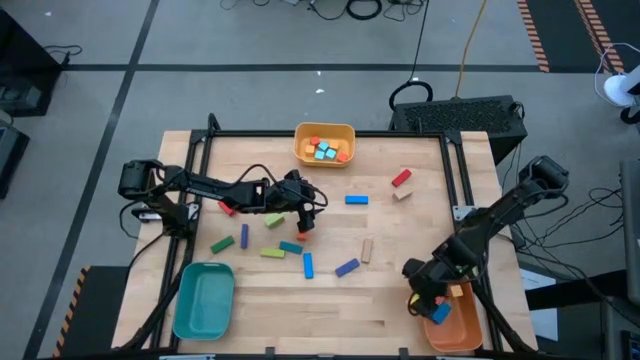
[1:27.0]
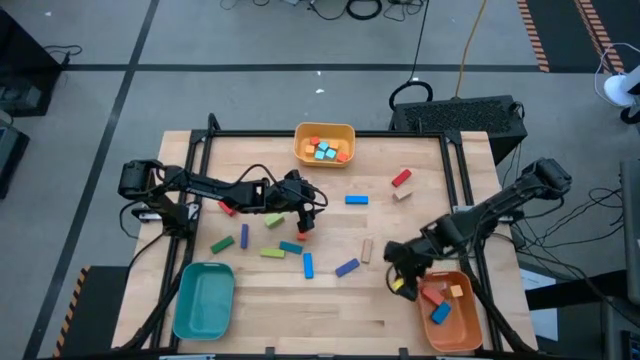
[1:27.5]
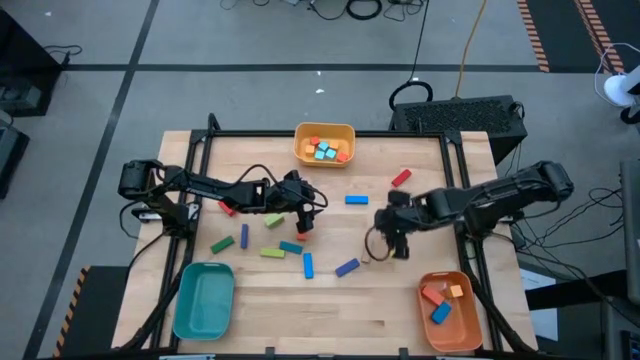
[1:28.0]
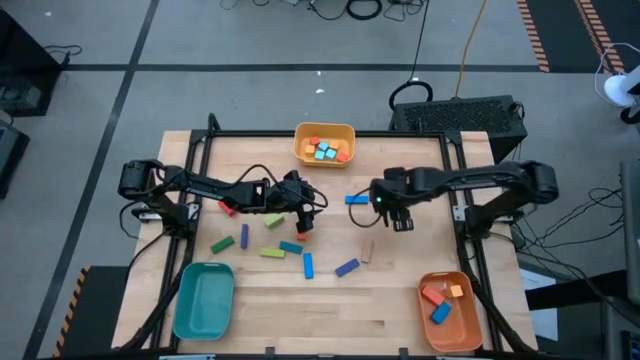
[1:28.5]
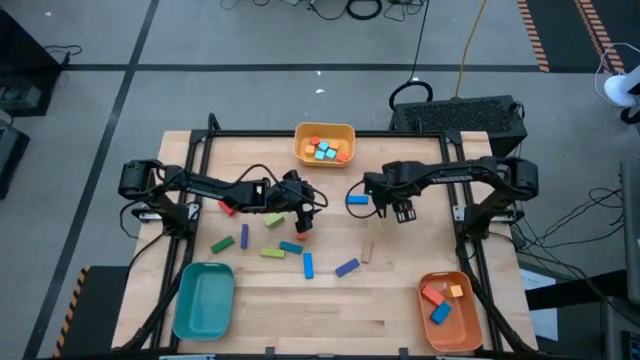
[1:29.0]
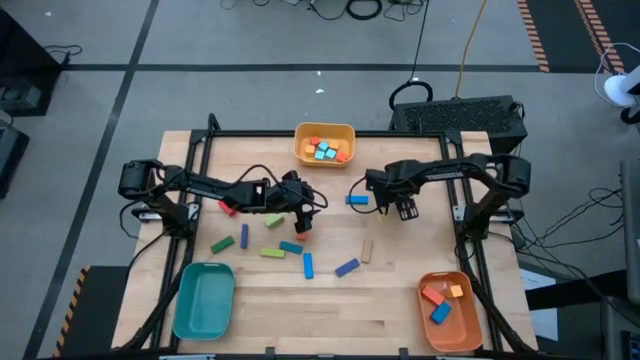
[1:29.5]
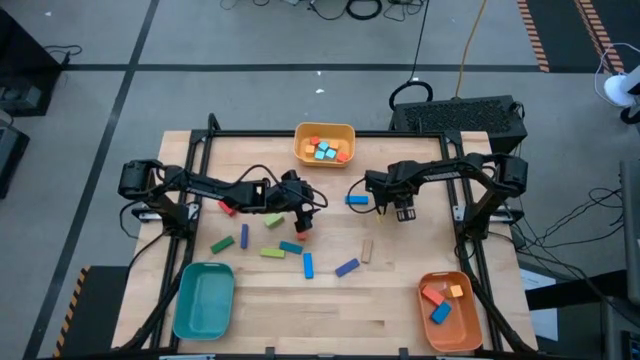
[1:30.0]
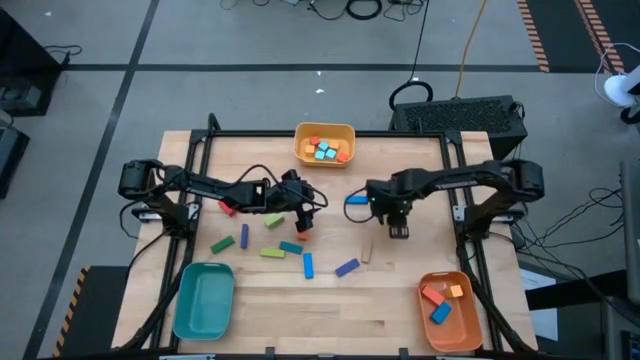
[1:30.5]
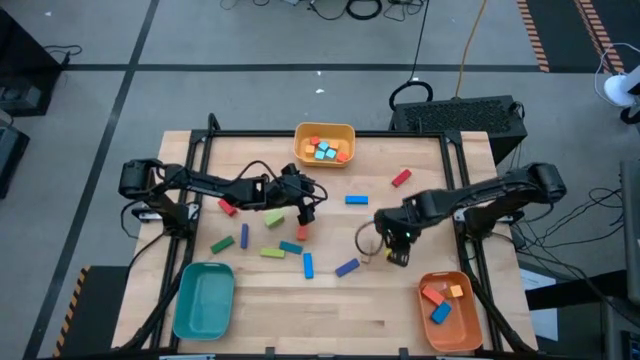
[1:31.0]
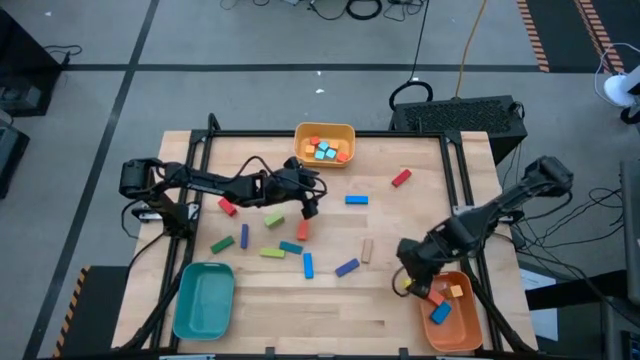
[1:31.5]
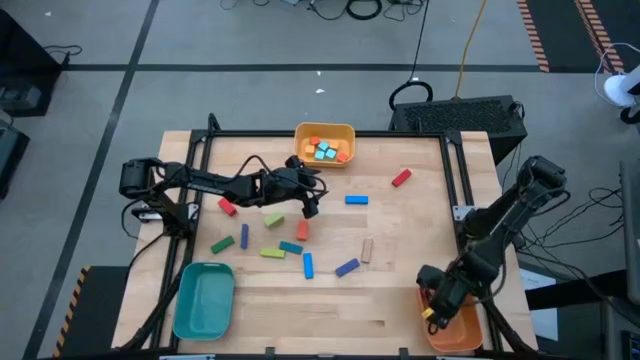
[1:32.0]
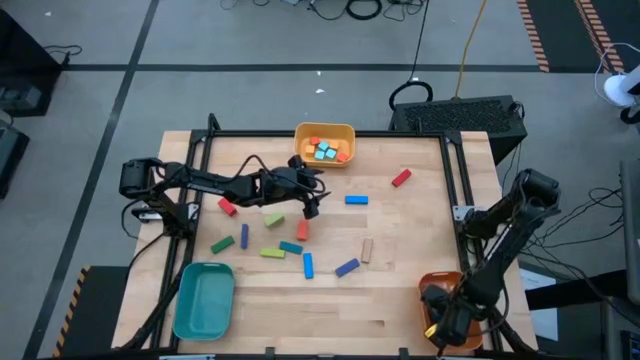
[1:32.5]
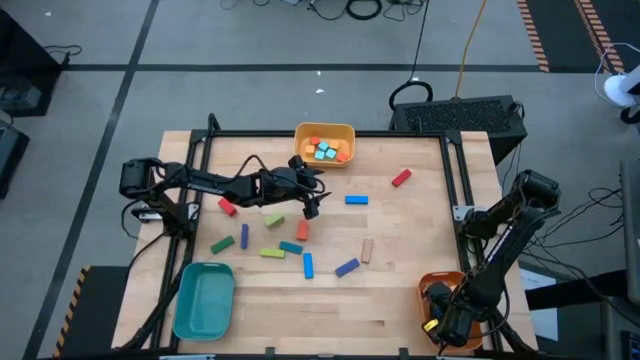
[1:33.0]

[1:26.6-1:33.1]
Task: Sort blocks by size
Put the big brown rectangle block into the orange bin

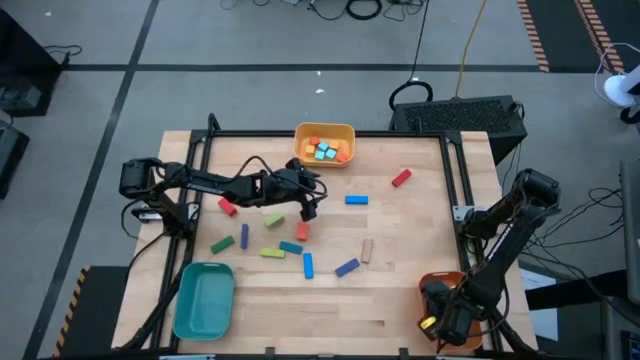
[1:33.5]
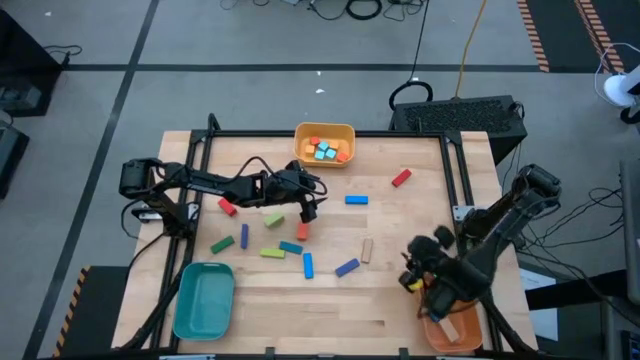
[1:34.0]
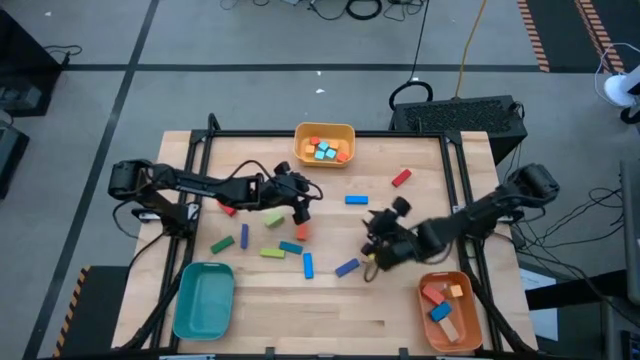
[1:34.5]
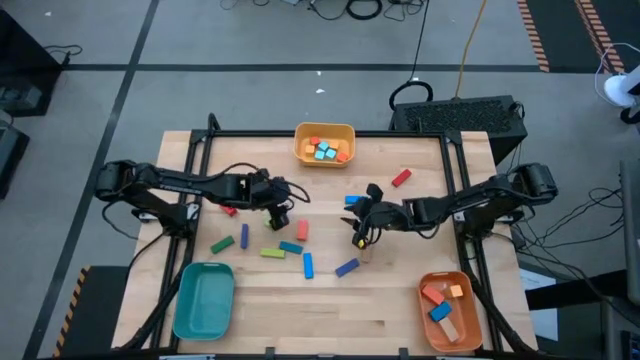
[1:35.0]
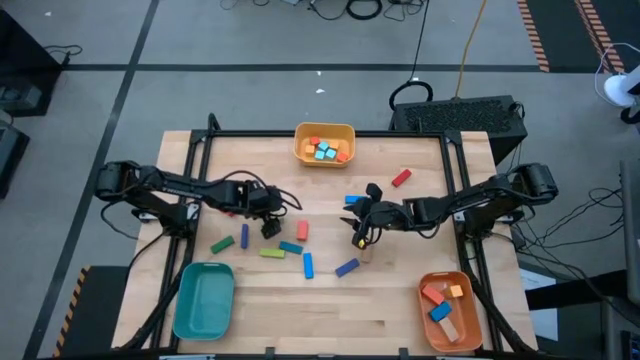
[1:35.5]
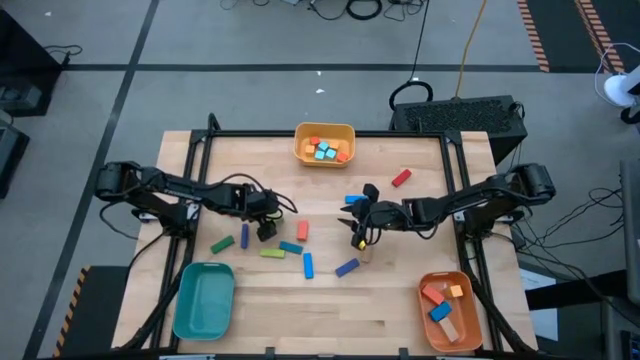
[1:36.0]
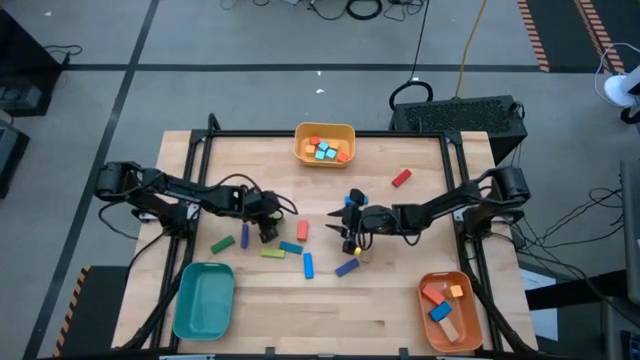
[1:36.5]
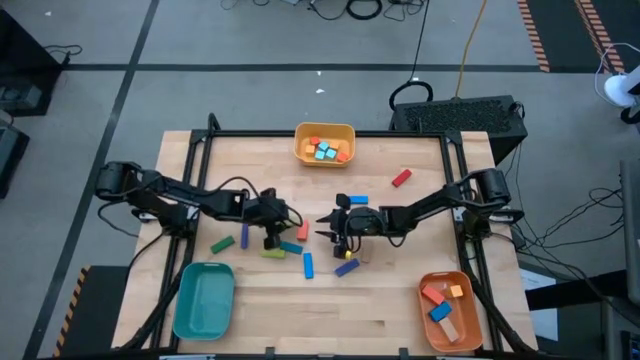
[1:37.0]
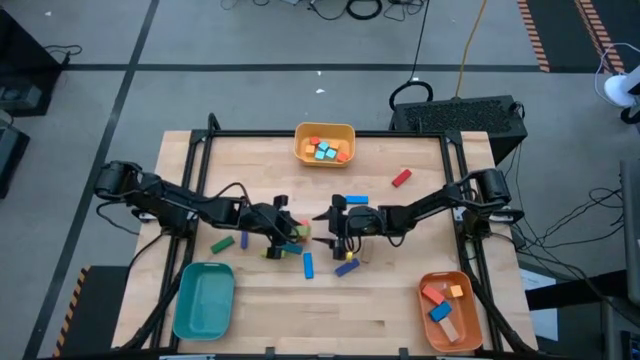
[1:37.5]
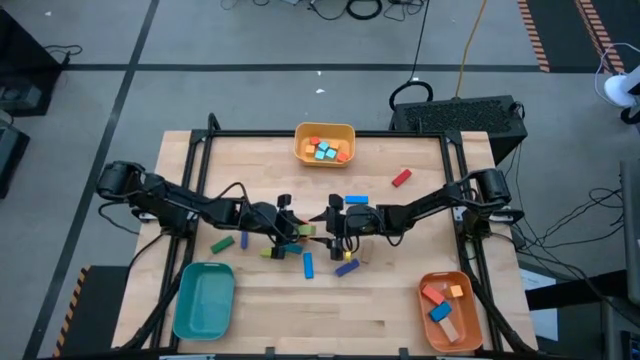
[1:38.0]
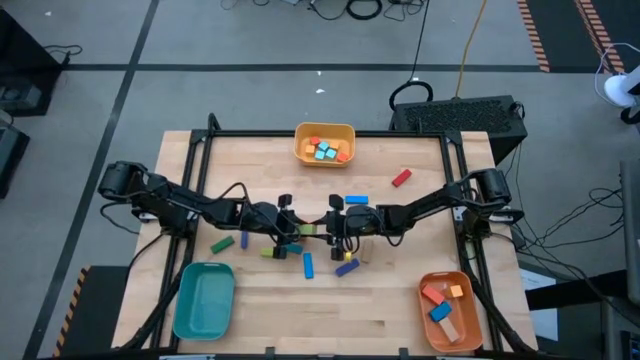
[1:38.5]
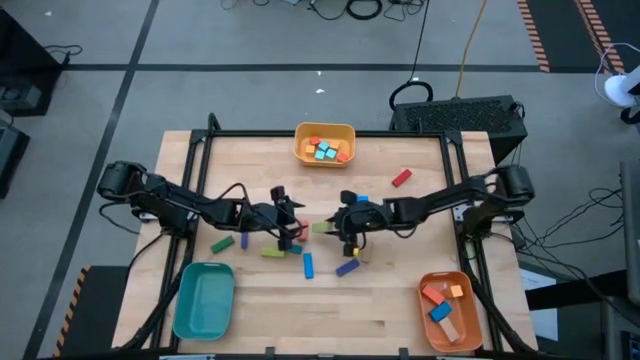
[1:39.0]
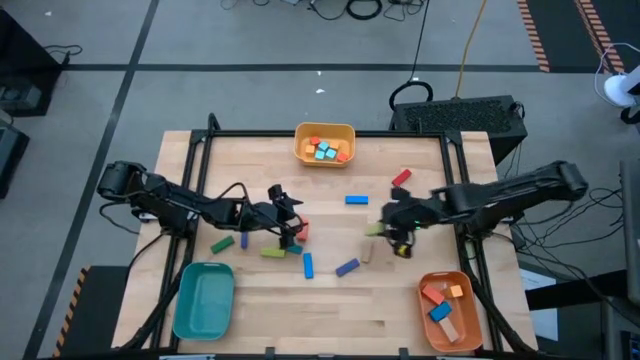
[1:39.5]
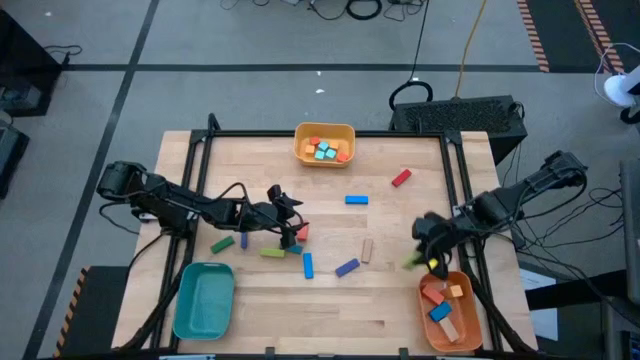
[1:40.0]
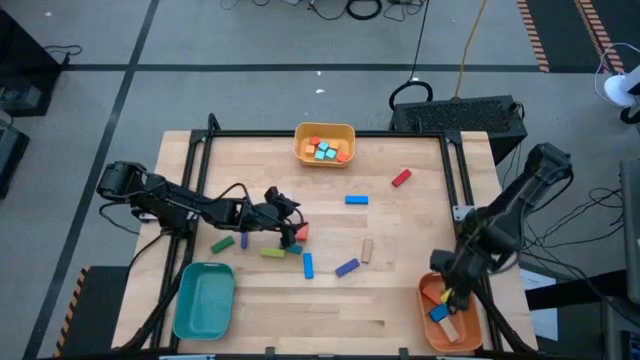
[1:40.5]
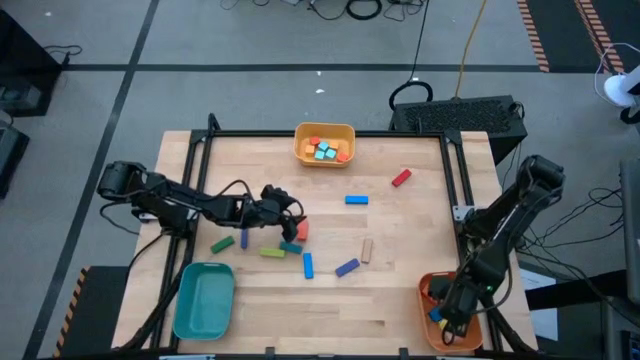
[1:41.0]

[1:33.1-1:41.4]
Put the big green rectangle block into the orange bin

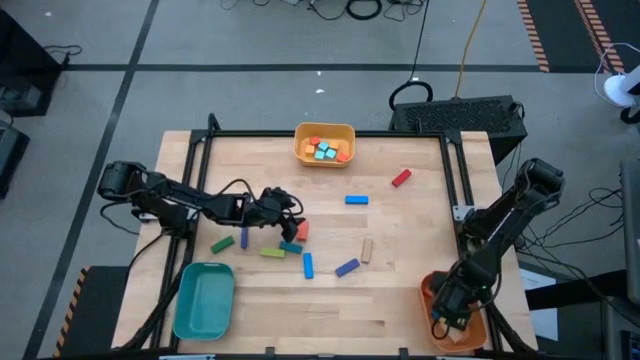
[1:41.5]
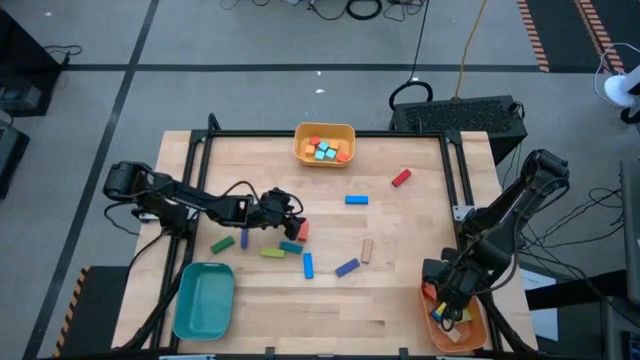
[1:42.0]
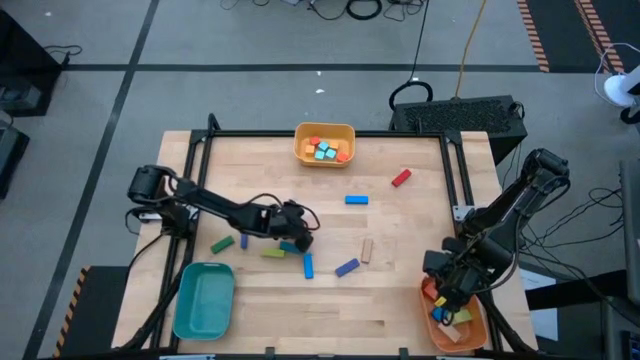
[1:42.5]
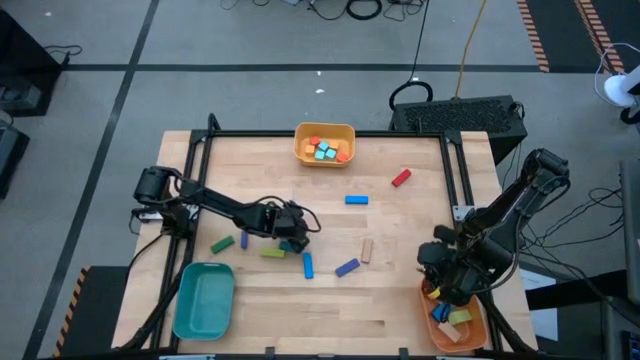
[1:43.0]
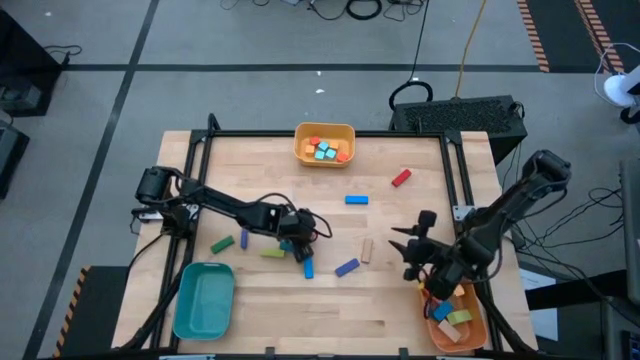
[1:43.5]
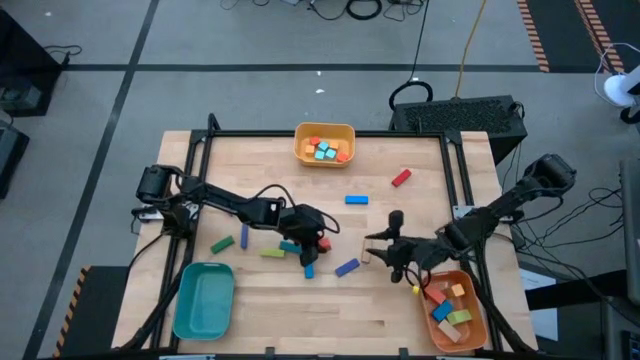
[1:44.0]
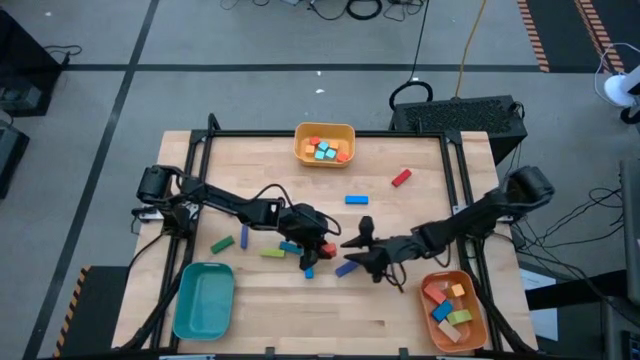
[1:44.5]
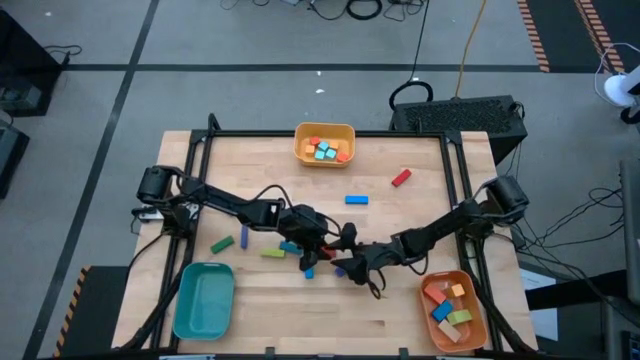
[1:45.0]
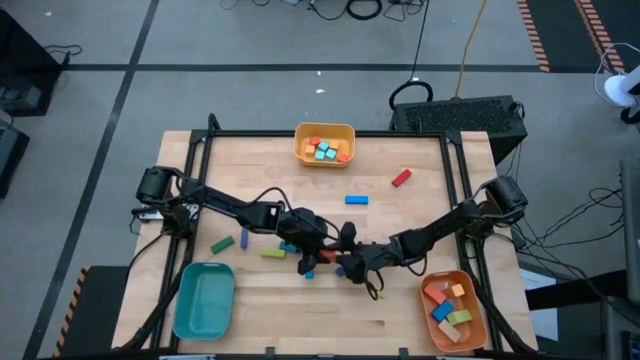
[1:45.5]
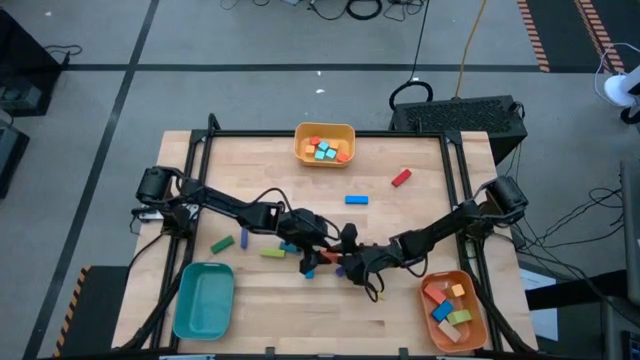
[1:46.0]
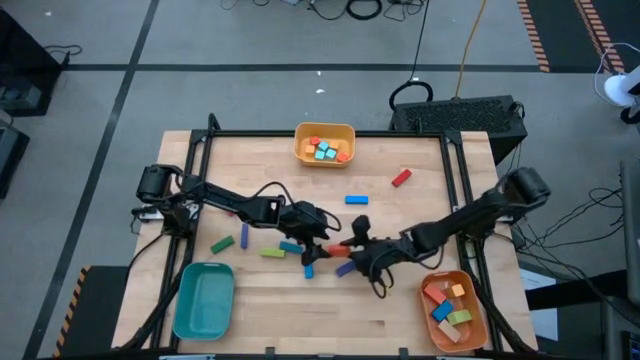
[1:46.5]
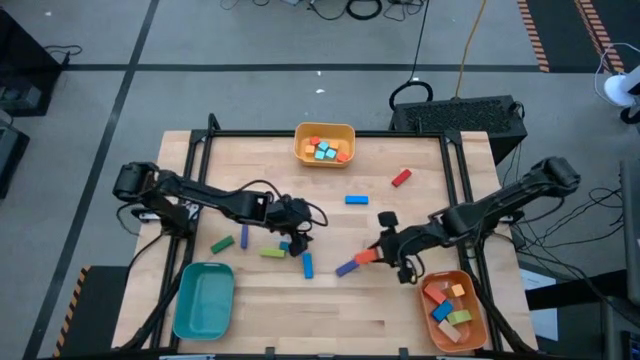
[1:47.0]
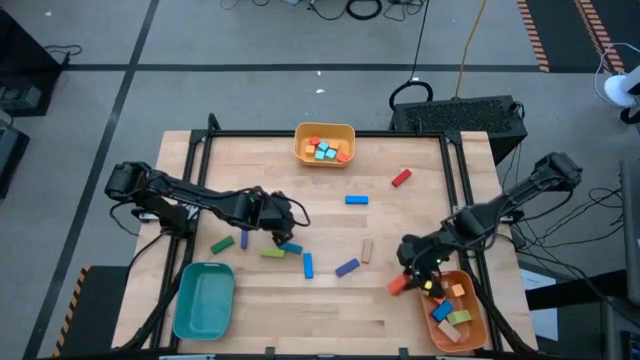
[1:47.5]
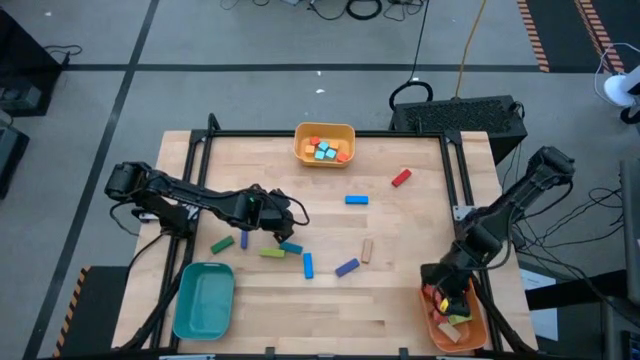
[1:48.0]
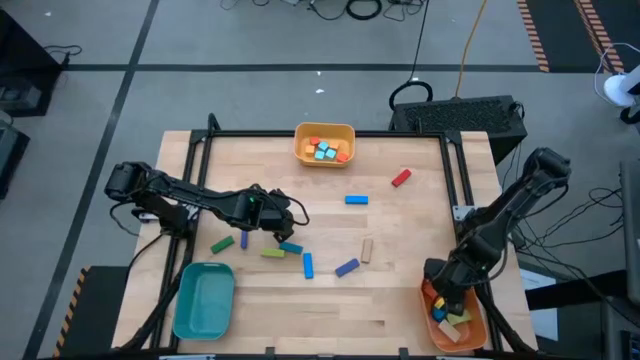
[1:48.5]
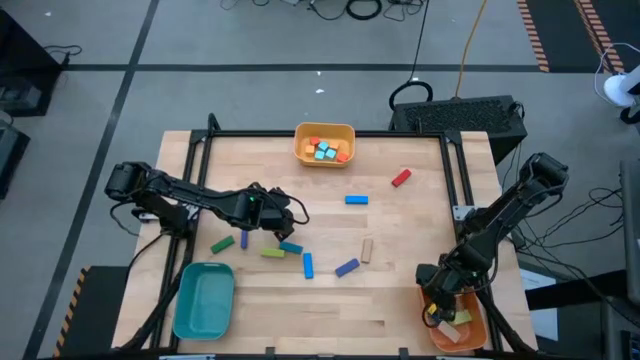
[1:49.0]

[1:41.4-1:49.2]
Put the big orange rectangle block into the orange bin
